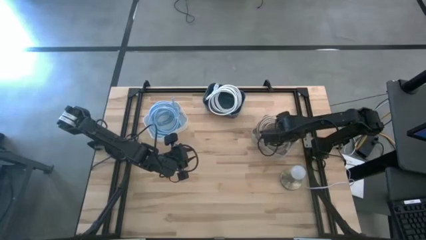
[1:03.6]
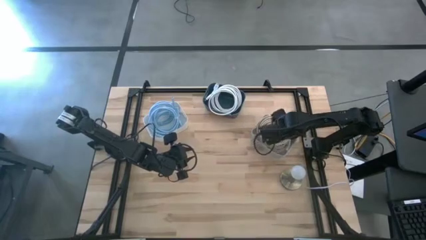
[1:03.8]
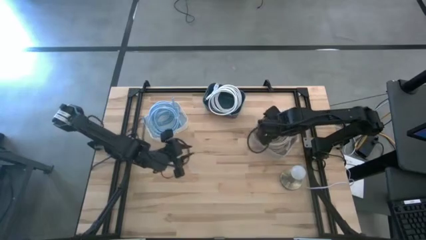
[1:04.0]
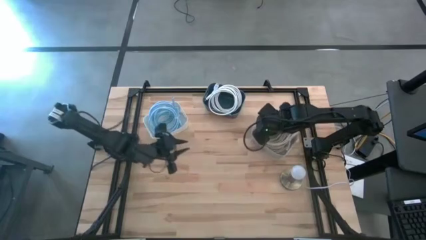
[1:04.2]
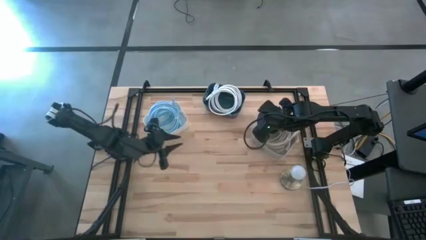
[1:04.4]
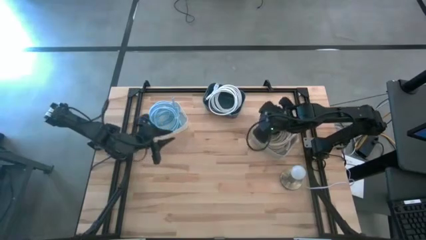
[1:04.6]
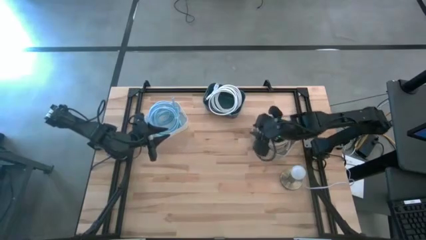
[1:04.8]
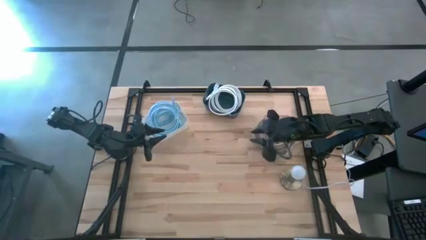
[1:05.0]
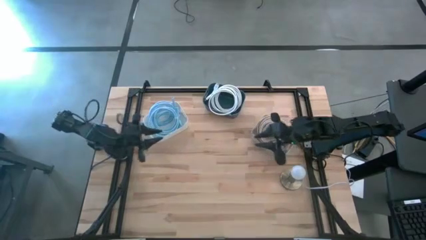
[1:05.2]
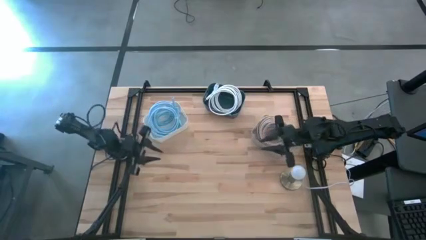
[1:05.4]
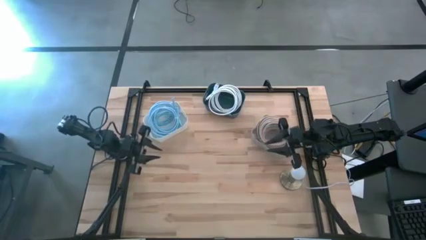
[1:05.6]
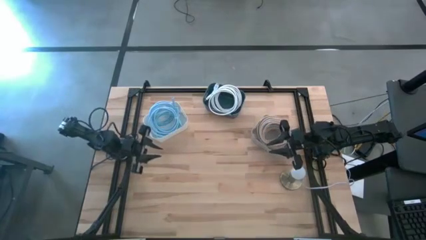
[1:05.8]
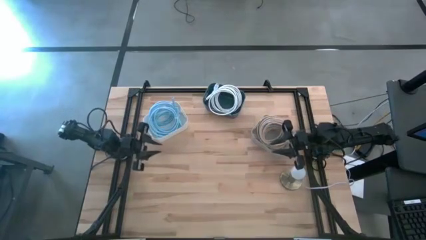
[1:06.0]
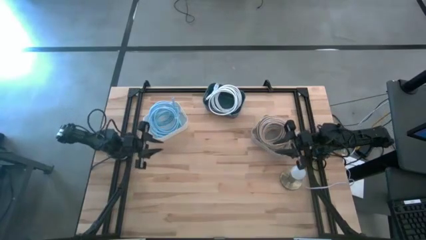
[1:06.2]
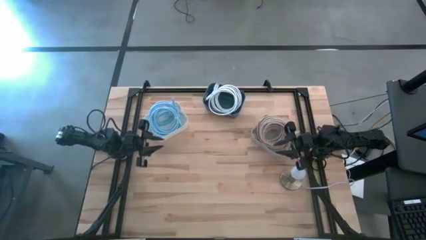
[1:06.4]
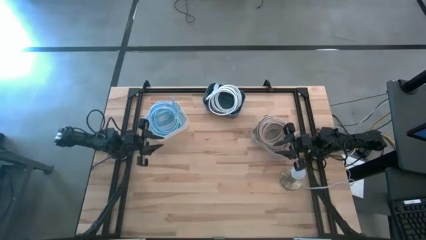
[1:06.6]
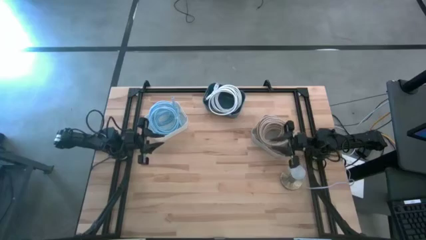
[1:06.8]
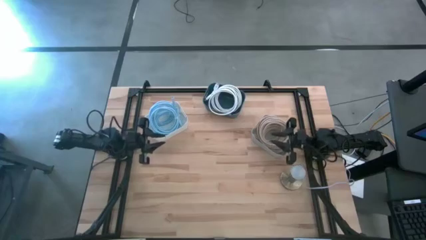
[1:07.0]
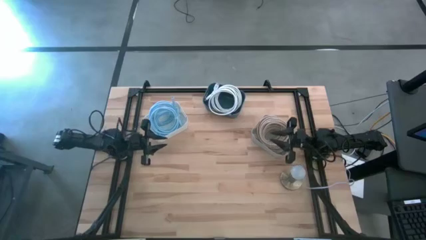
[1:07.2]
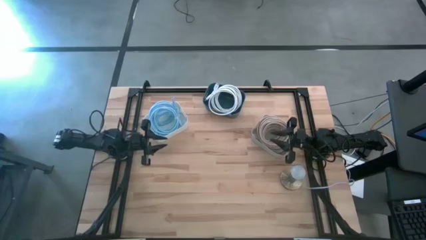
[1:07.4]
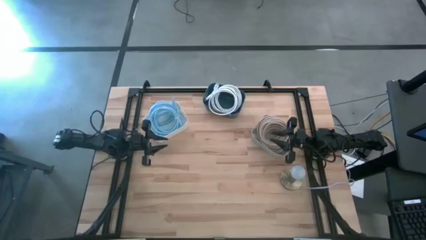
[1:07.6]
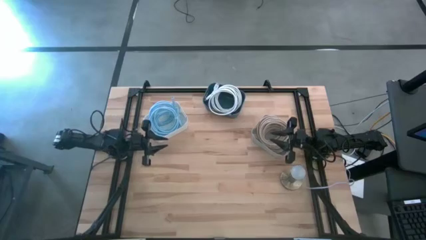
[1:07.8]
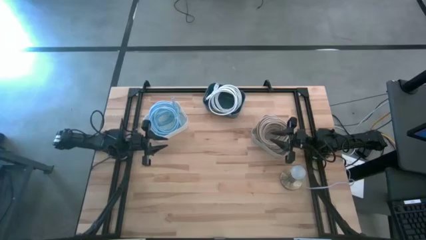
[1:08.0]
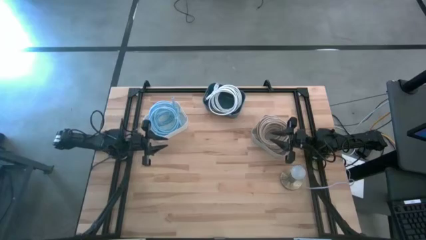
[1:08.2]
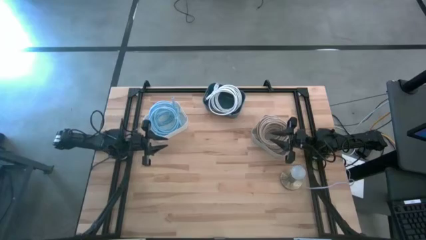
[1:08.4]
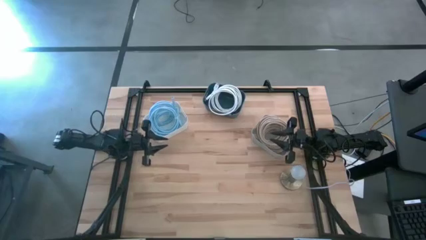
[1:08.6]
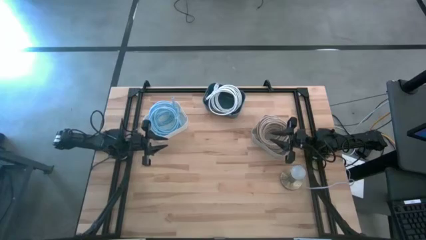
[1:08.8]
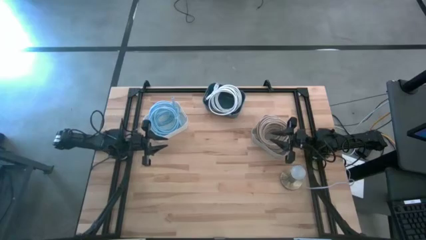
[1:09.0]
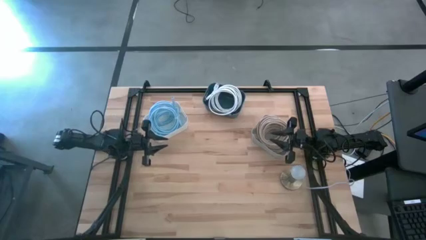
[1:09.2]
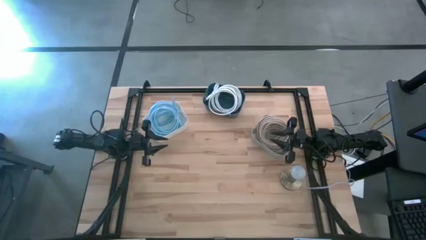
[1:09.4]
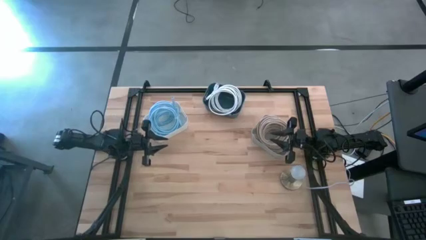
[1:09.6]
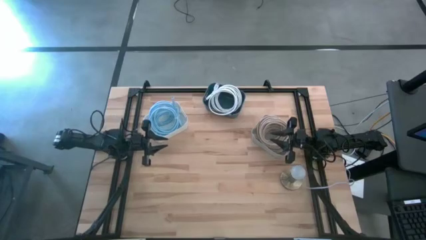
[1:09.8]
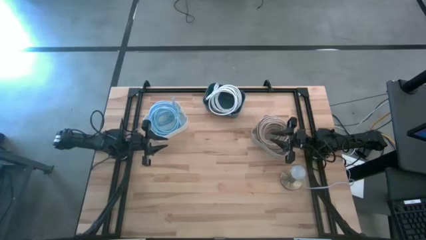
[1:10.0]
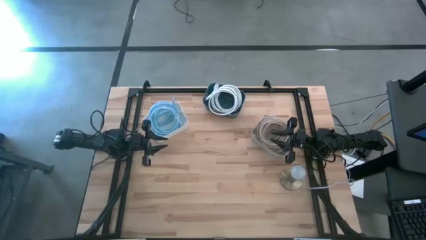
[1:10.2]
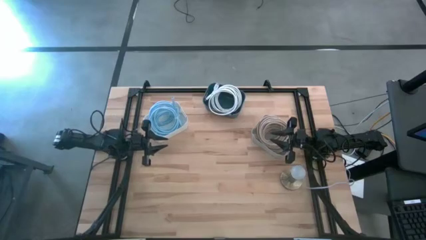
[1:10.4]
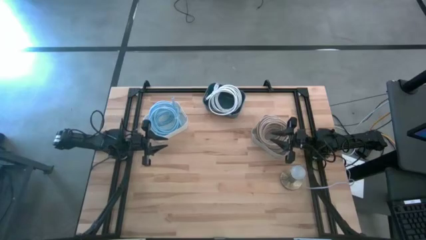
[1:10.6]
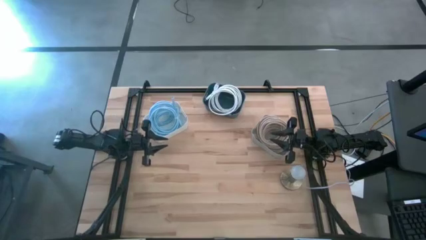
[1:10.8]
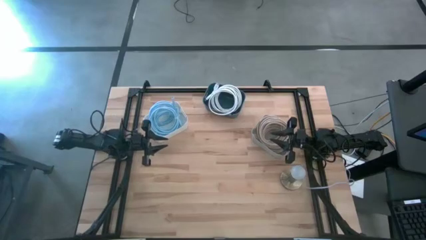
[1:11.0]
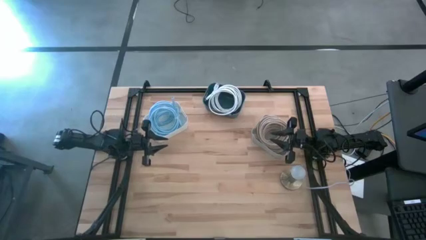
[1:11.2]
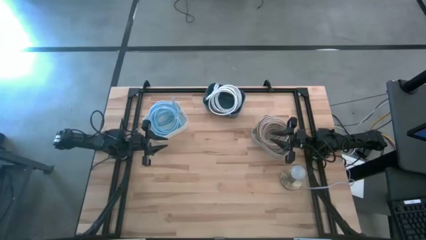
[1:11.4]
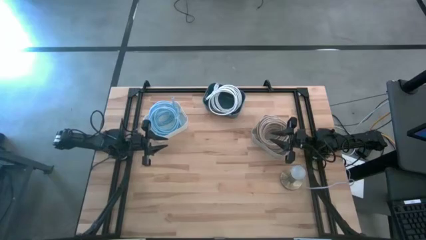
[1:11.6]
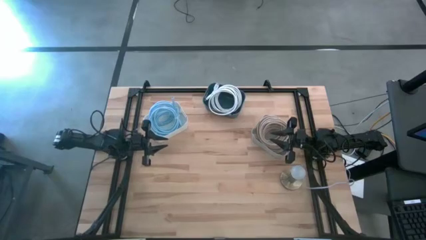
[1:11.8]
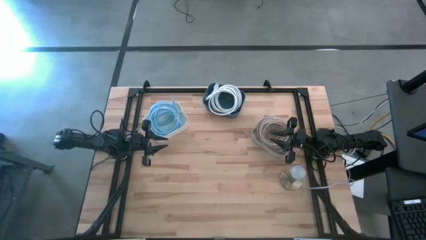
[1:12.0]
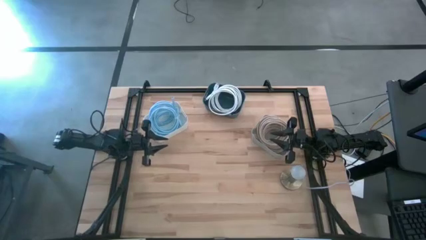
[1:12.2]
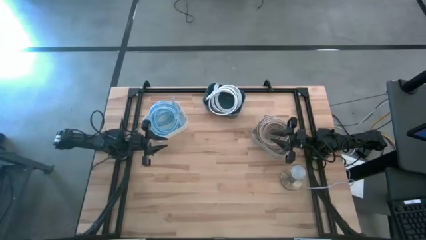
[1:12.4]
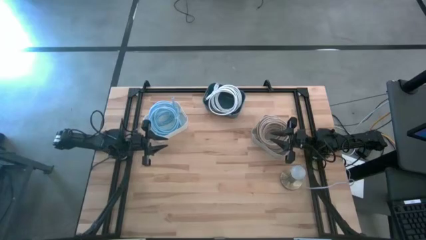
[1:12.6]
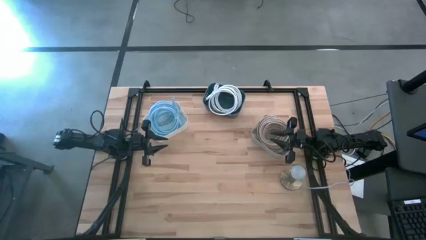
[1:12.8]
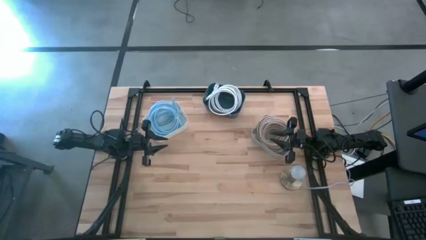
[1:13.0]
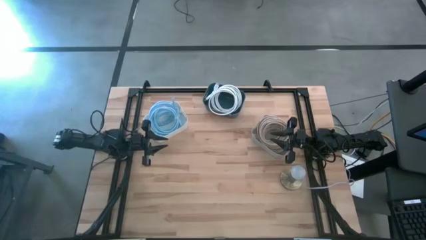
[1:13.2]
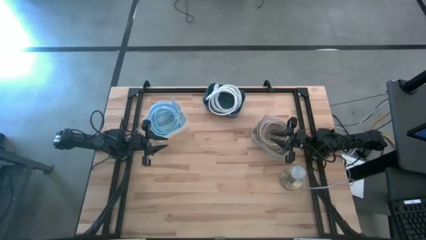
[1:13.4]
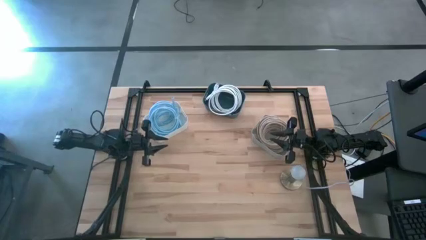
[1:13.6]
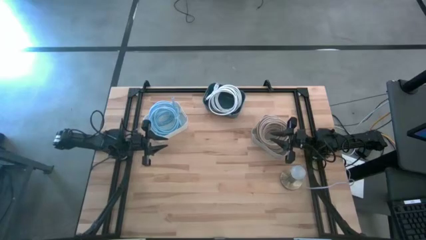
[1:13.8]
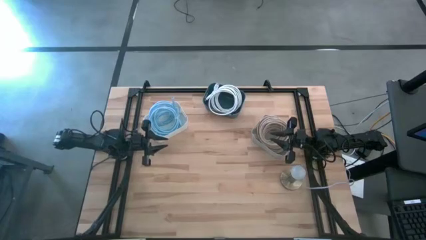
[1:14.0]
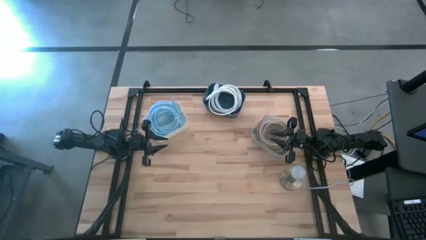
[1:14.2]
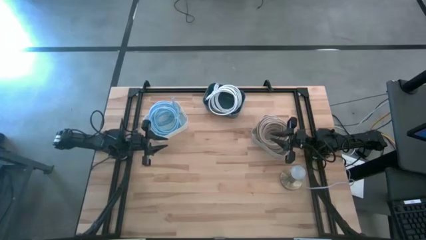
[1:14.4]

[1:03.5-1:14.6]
Task: Pick & Place USB Port
Return to Home Position

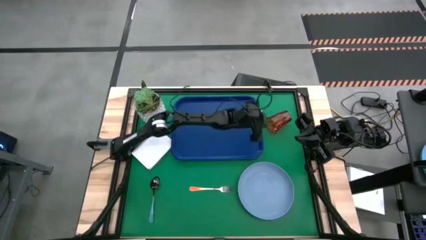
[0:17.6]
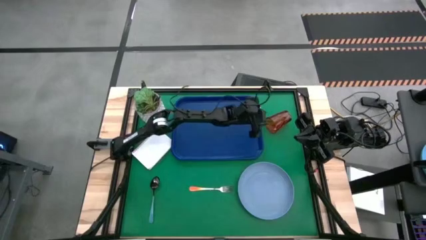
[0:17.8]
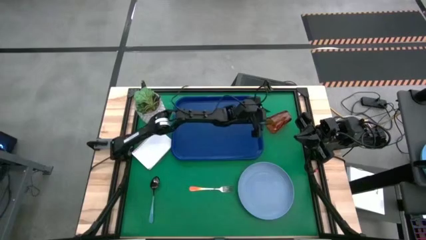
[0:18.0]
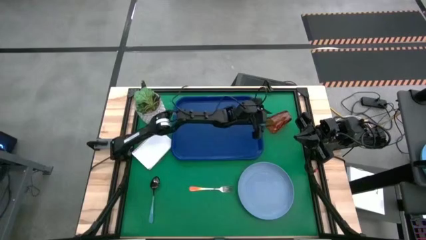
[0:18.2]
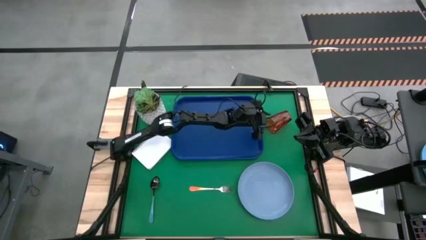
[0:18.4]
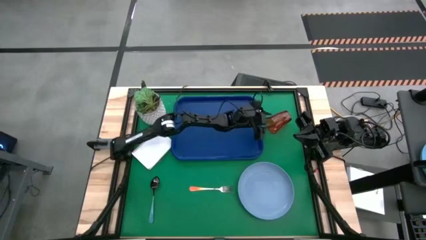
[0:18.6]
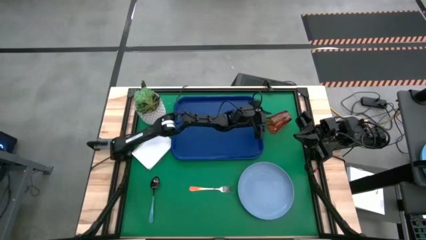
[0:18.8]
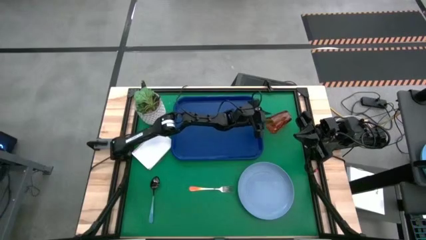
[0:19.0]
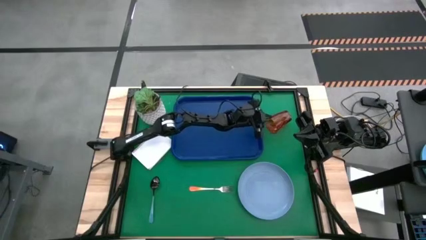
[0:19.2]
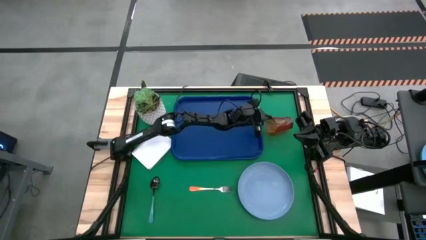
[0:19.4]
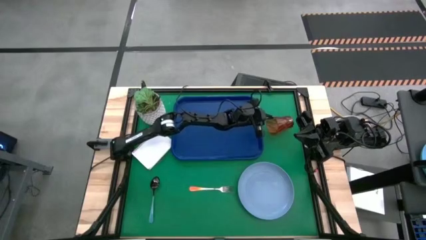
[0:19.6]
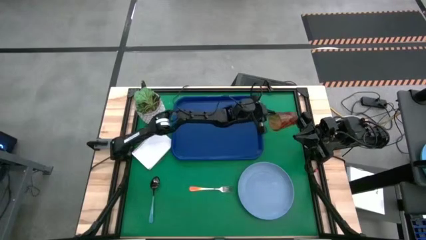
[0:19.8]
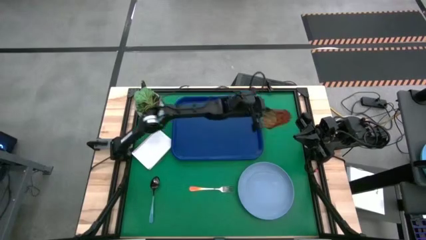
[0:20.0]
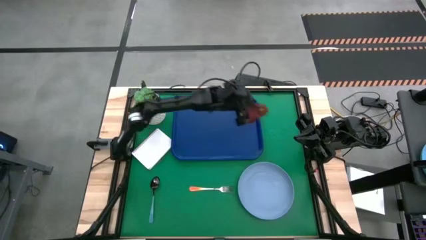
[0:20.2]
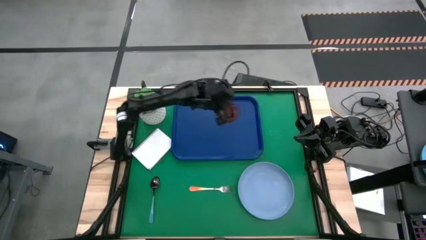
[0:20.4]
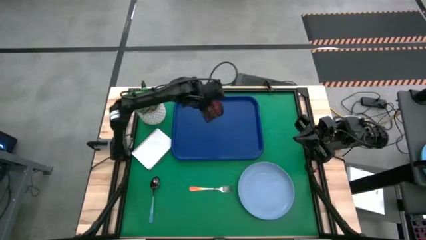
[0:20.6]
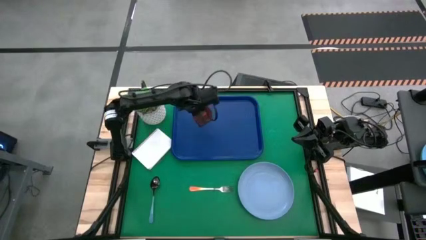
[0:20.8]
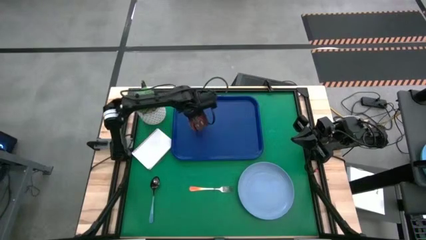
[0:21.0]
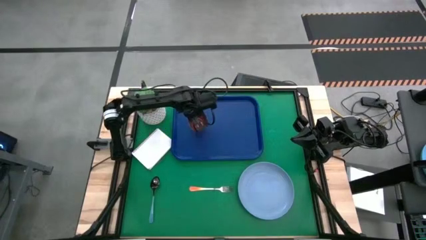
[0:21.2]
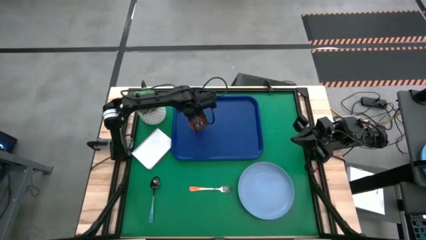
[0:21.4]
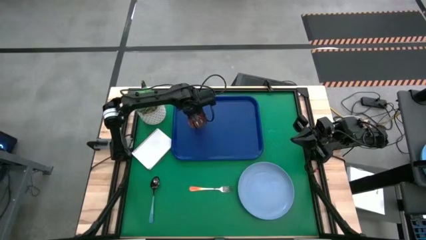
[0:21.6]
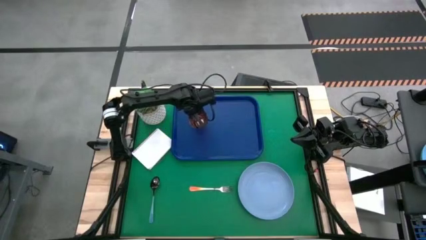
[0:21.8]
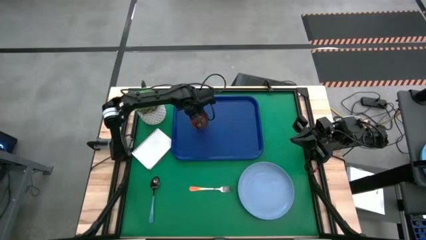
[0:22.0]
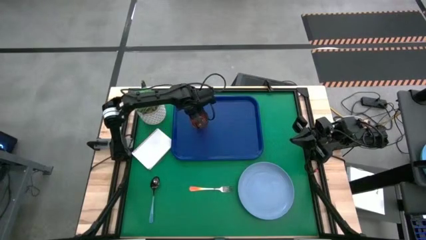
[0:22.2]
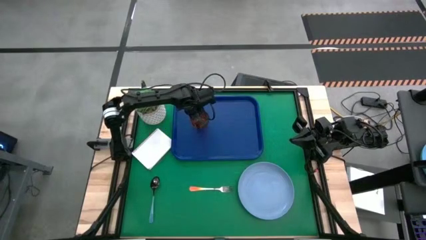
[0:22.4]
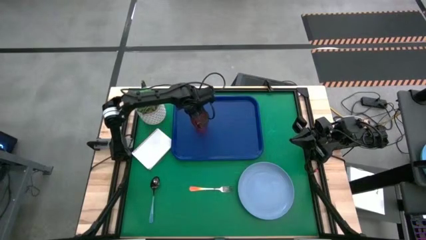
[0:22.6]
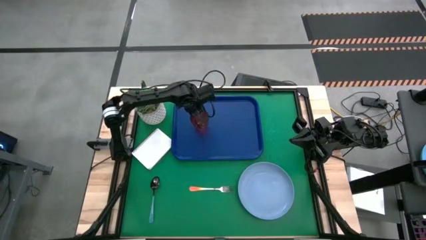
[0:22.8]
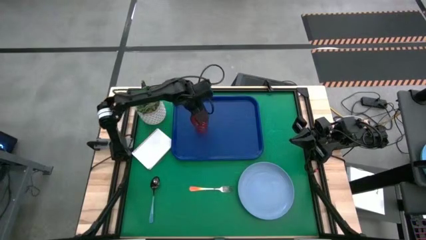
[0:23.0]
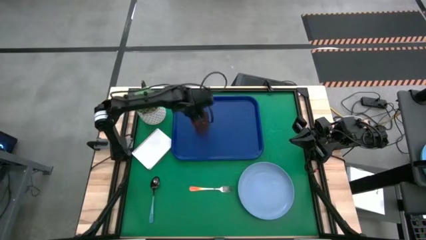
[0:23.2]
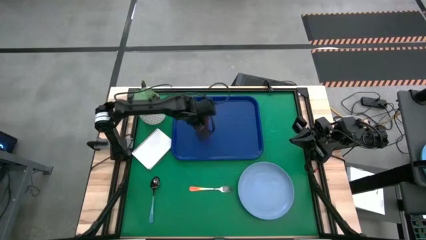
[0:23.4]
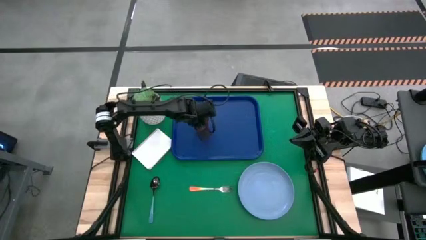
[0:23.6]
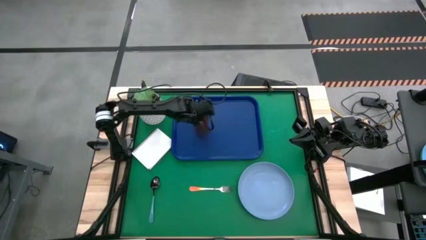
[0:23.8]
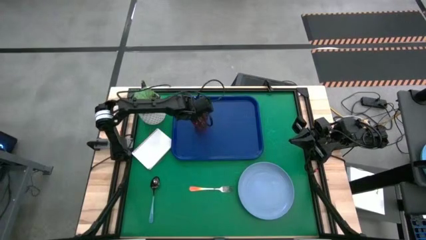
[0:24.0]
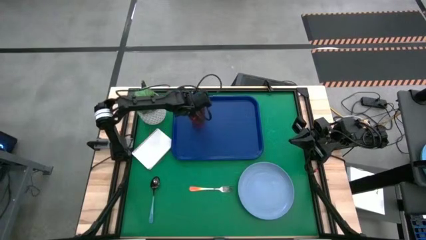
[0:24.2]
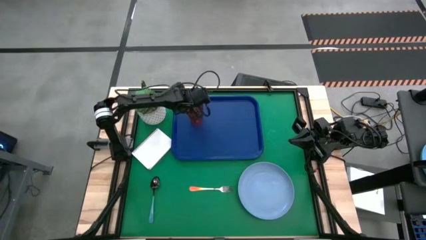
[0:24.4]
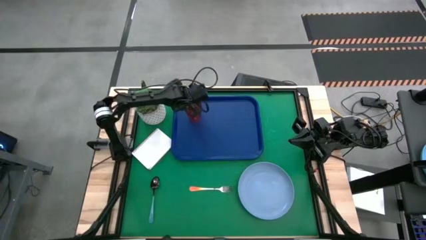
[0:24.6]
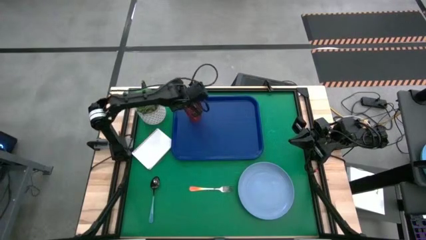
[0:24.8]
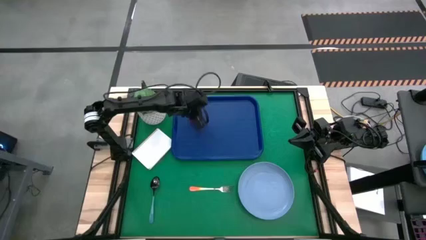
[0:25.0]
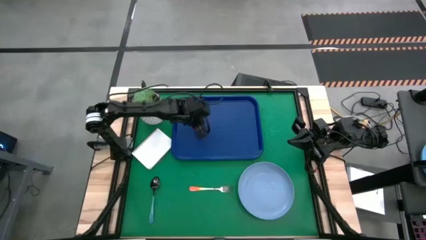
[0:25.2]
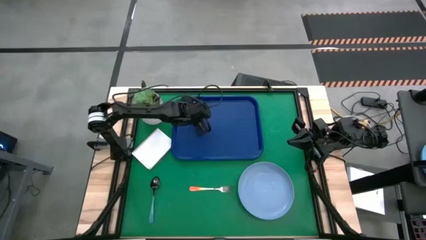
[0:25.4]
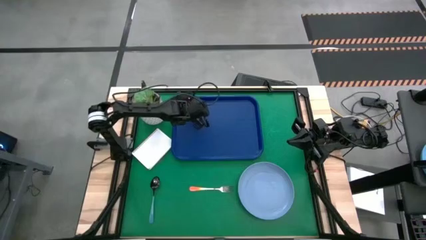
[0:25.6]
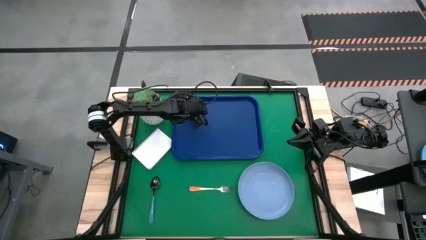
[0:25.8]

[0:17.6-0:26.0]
Task: Pick and place plate/cup/fork/spoon on tray
Put the red cup on the top left of the blue tray
